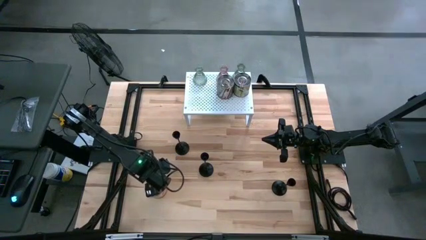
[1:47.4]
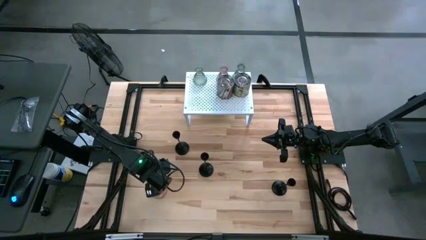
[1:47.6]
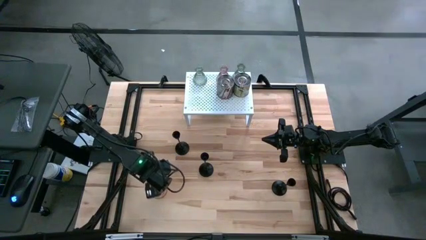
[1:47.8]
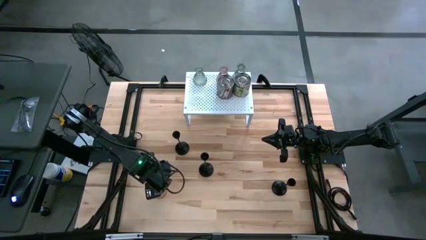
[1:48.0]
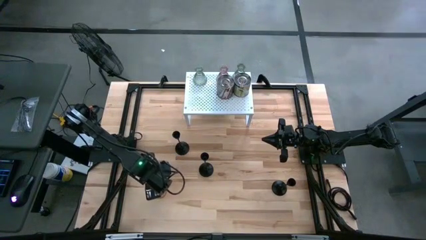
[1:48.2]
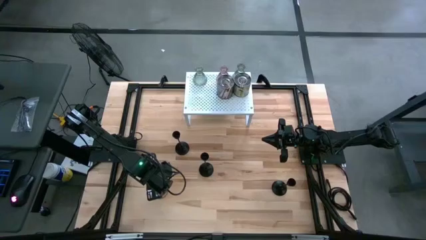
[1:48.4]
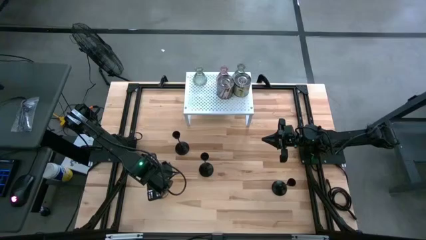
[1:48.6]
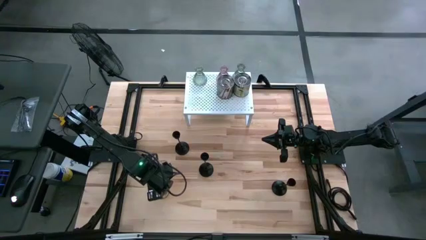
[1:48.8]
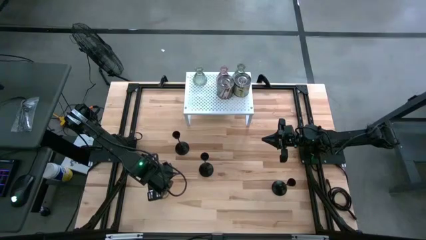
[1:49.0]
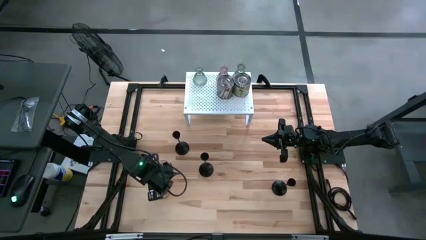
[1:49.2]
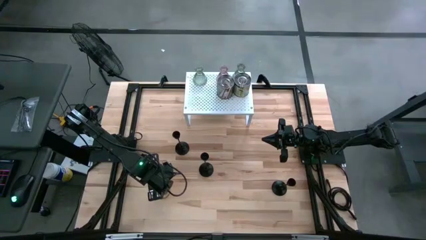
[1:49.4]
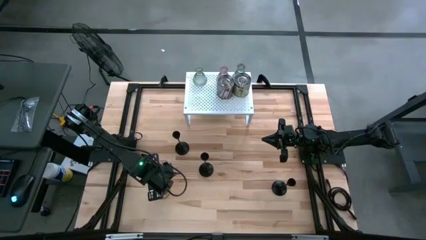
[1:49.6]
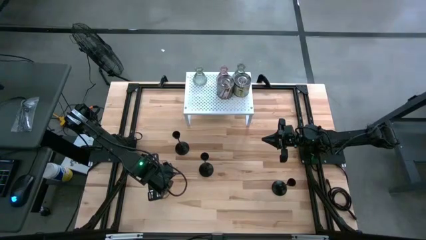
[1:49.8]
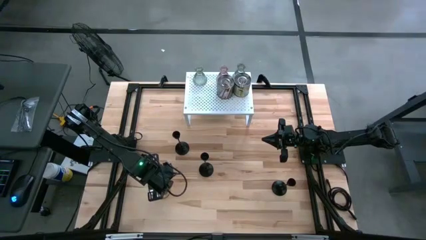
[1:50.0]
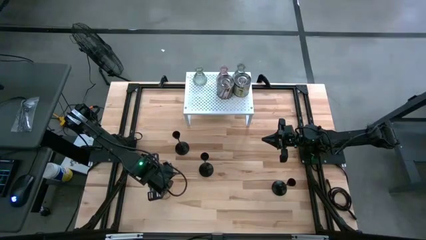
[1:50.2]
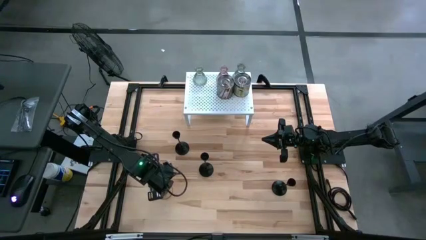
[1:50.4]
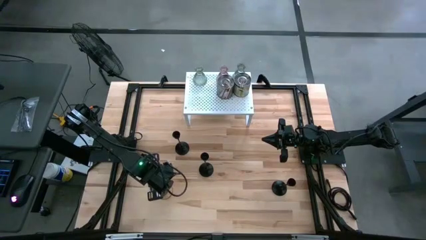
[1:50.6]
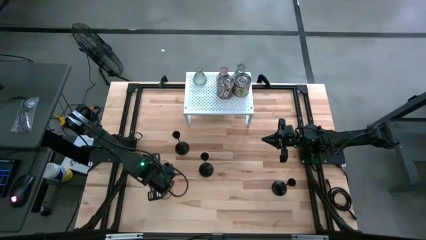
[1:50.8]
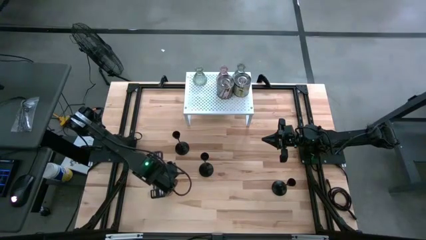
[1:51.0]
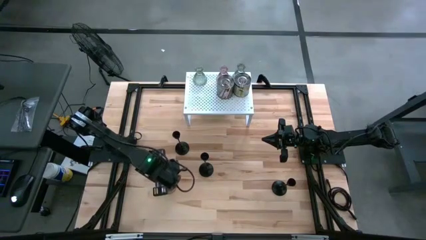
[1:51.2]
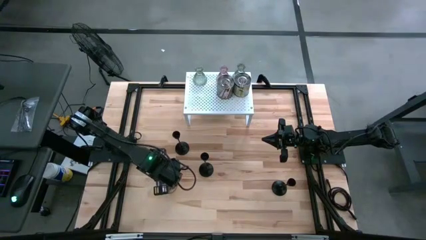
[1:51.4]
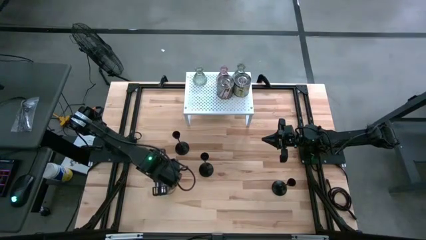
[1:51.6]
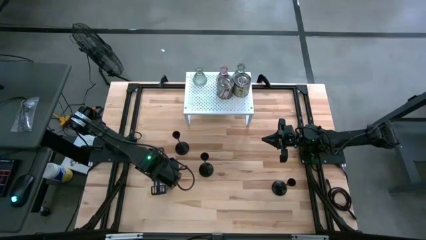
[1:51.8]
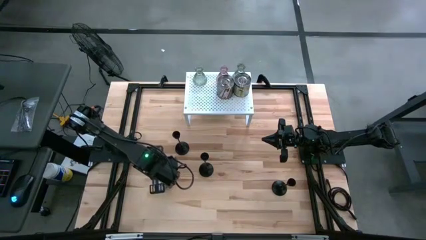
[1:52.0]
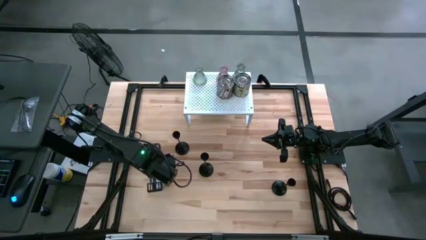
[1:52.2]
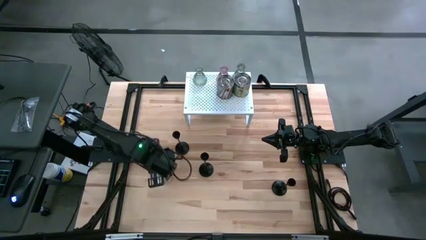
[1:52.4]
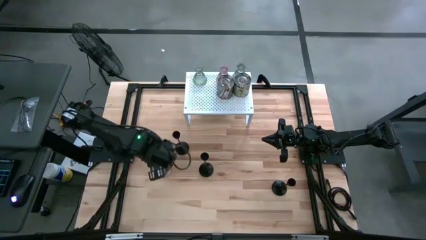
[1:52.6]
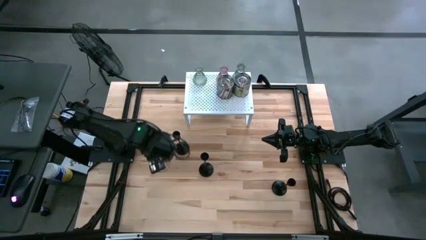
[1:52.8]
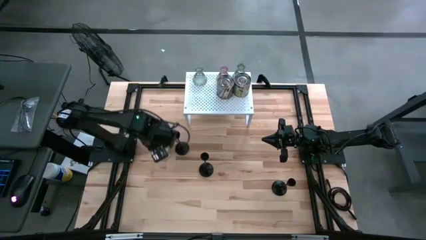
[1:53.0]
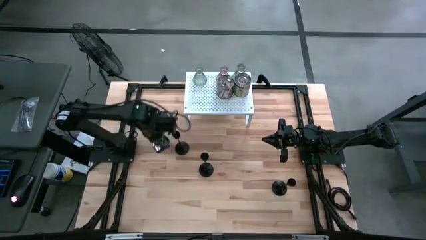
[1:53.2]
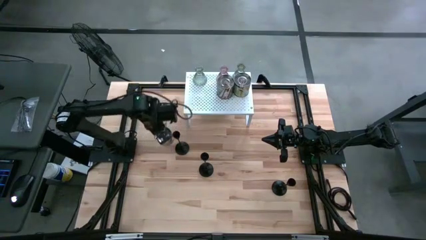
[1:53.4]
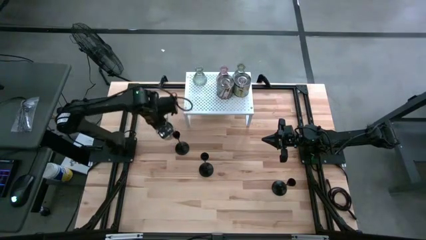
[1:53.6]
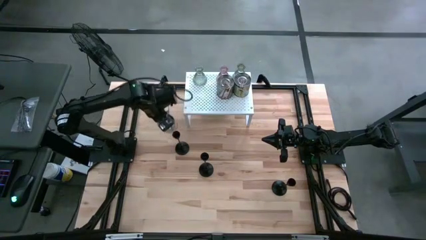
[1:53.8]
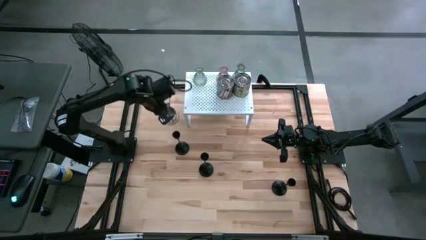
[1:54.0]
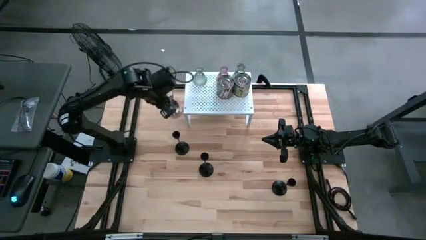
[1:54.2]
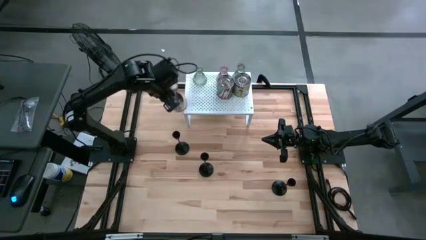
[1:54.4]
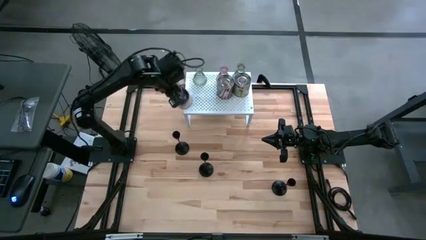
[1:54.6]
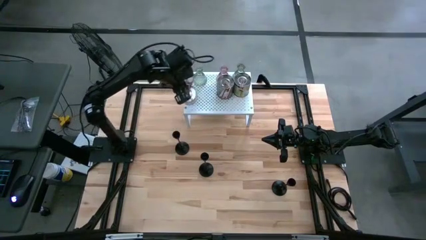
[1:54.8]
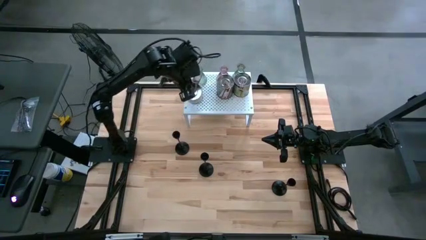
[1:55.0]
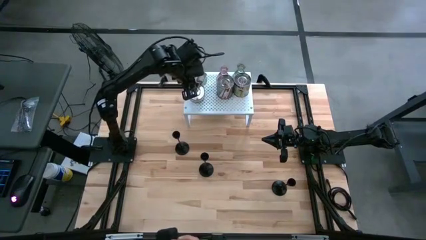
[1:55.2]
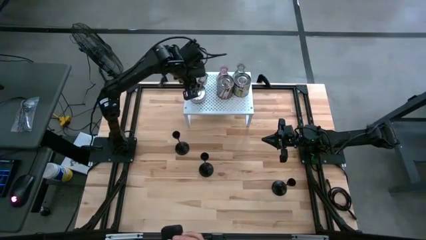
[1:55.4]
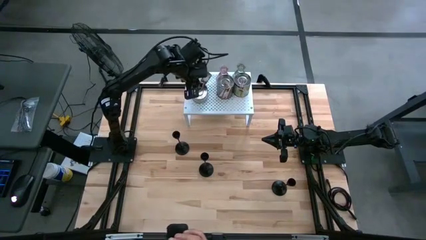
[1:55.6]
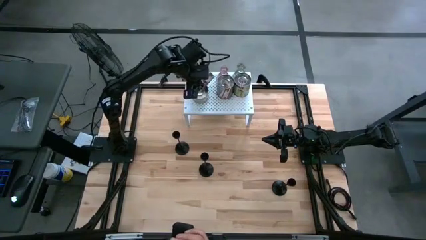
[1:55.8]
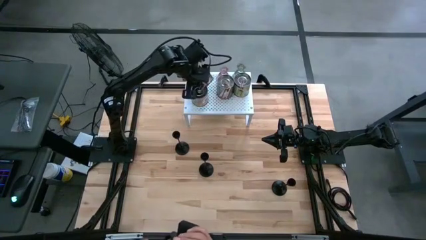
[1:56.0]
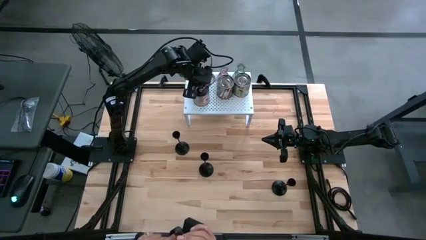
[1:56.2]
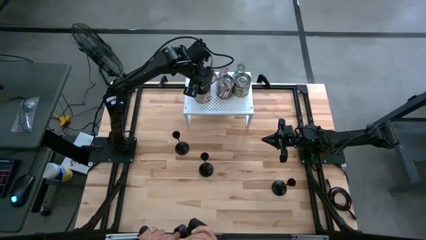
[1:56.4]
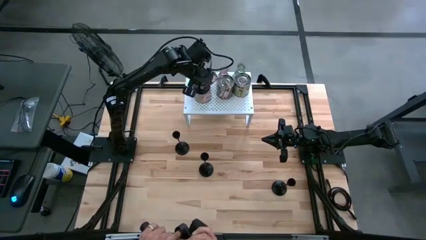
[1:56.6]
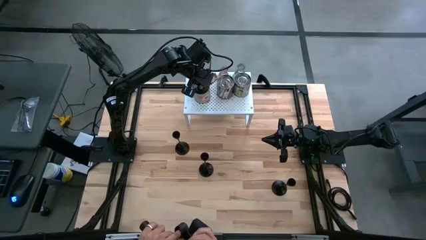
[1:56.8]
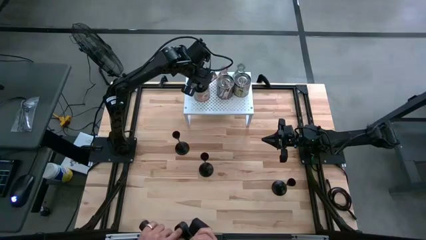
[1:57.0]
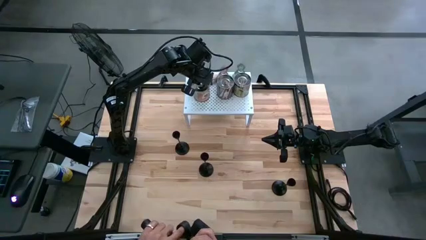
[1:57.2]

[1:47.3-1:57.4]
Task: Pick & Place candle stick holders
Put the orange scented candle on the shelf aligned with the other scented candles

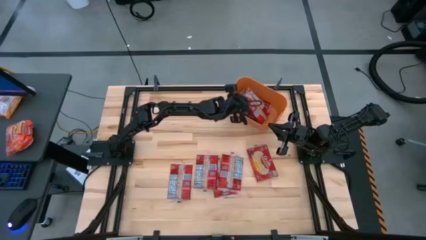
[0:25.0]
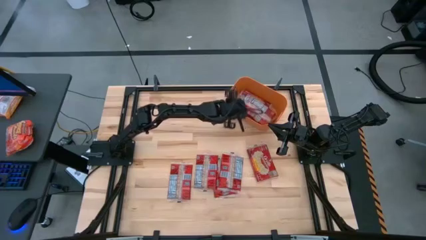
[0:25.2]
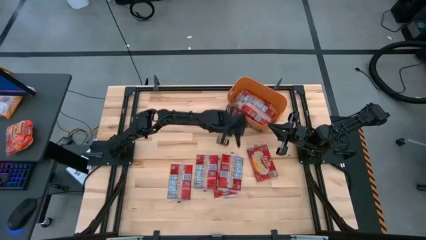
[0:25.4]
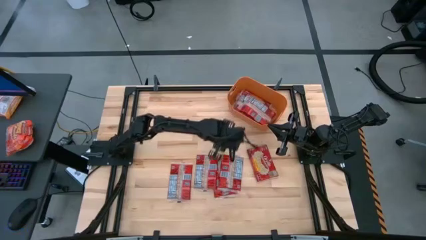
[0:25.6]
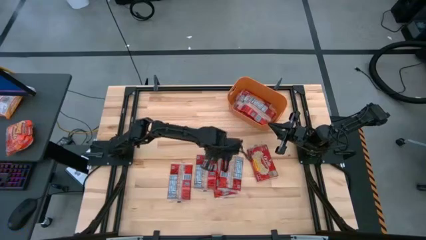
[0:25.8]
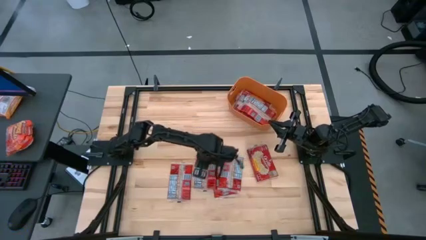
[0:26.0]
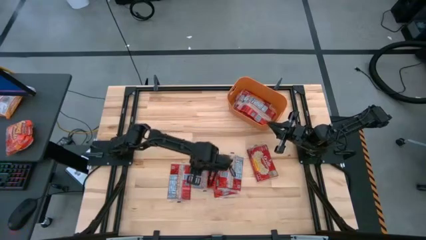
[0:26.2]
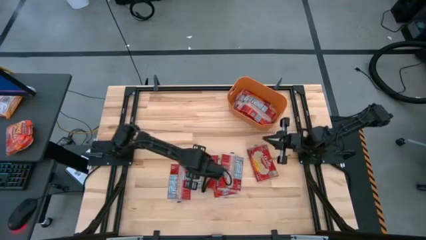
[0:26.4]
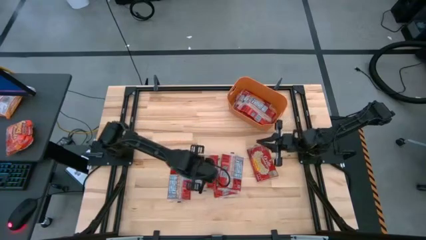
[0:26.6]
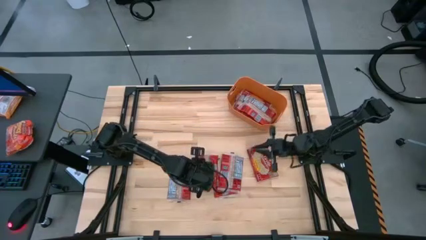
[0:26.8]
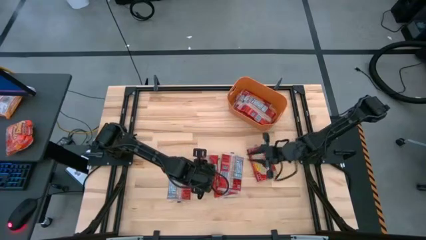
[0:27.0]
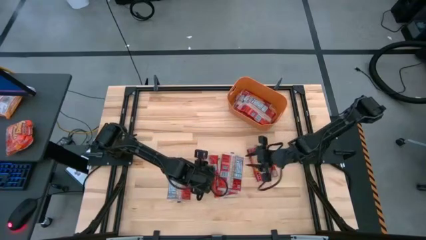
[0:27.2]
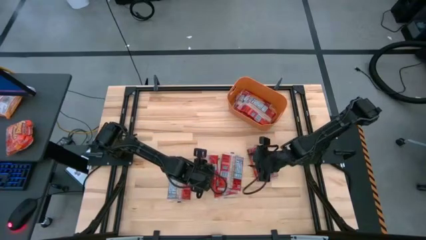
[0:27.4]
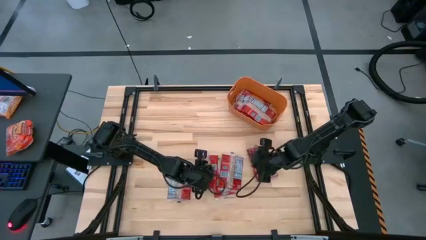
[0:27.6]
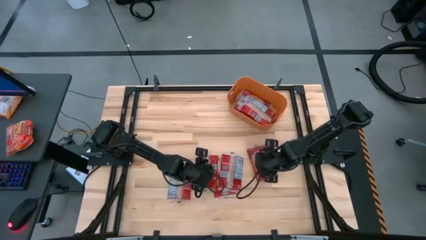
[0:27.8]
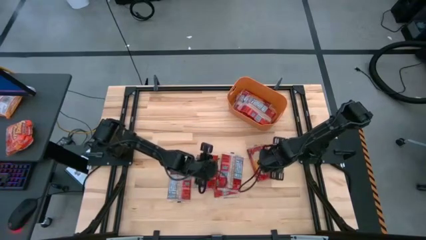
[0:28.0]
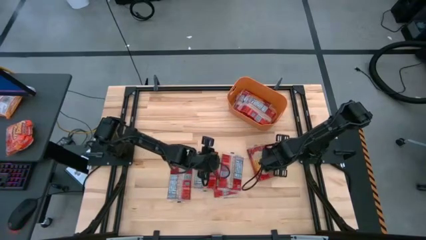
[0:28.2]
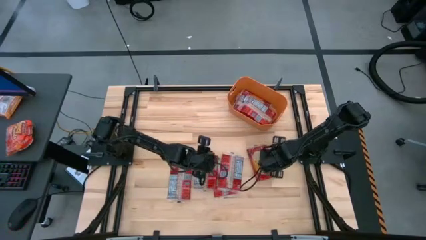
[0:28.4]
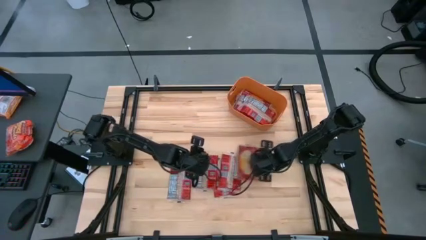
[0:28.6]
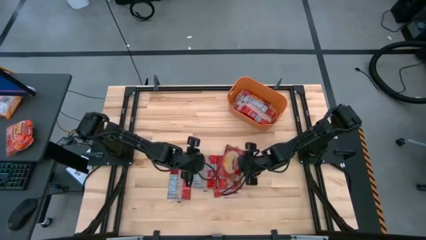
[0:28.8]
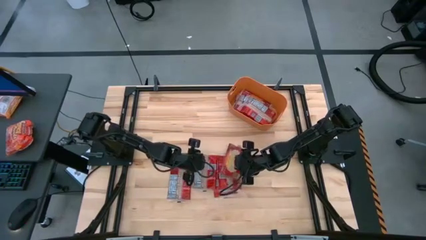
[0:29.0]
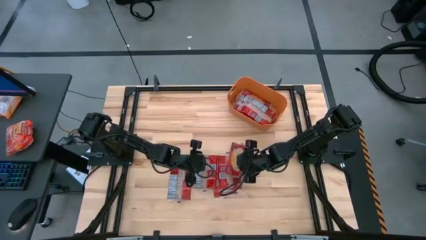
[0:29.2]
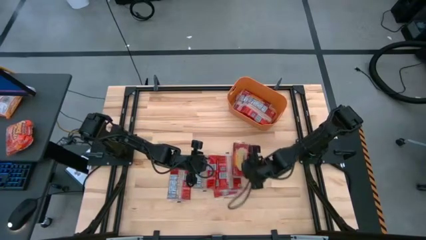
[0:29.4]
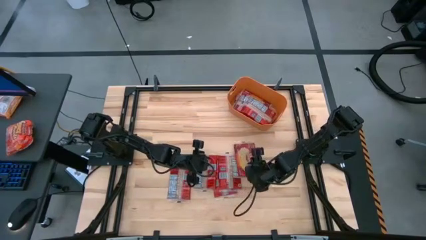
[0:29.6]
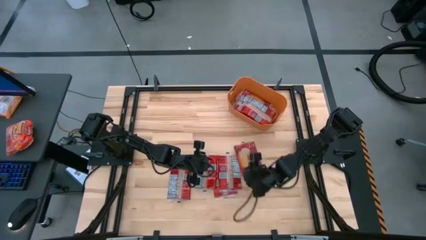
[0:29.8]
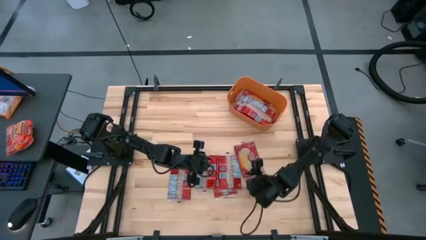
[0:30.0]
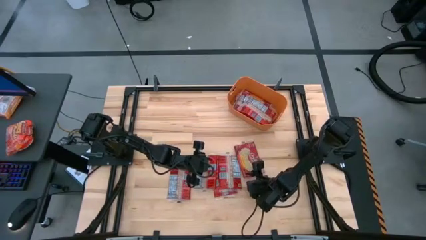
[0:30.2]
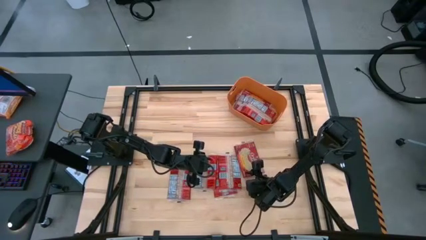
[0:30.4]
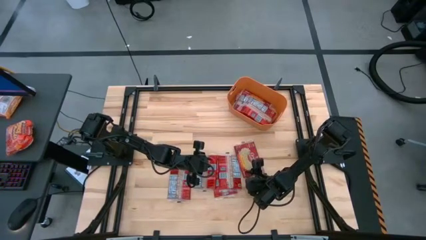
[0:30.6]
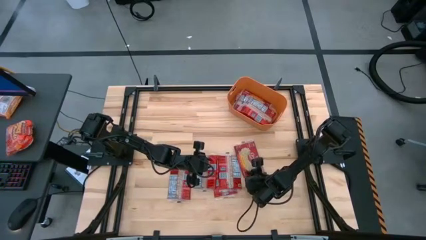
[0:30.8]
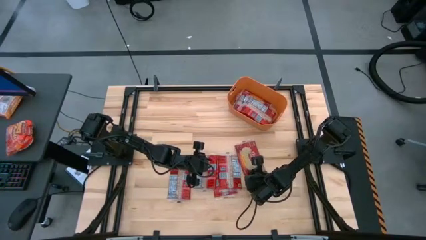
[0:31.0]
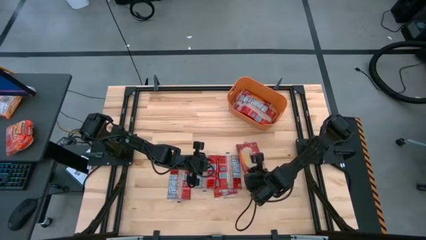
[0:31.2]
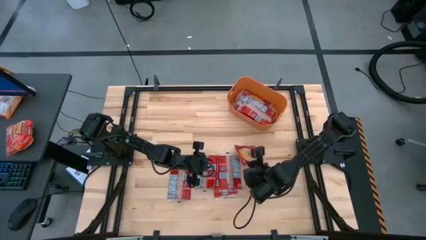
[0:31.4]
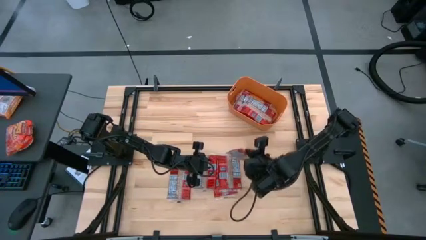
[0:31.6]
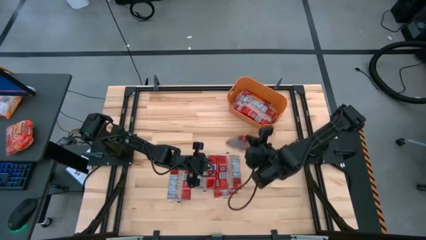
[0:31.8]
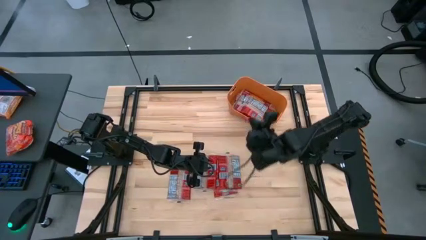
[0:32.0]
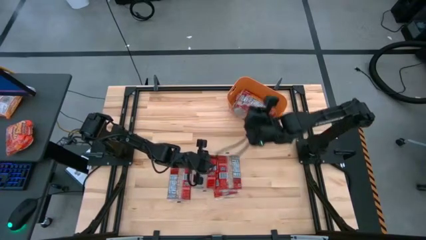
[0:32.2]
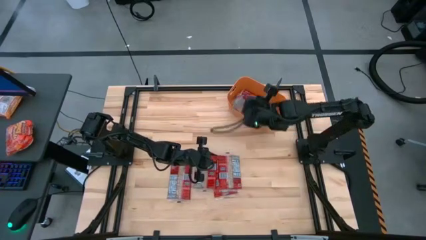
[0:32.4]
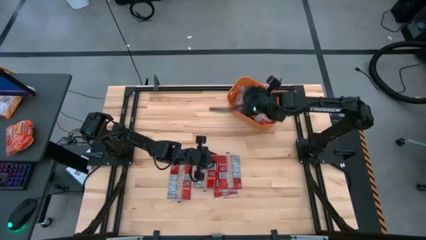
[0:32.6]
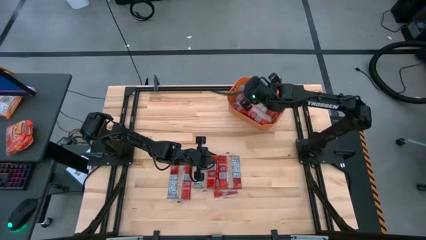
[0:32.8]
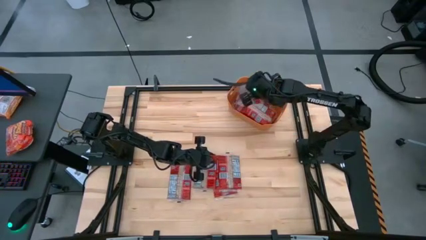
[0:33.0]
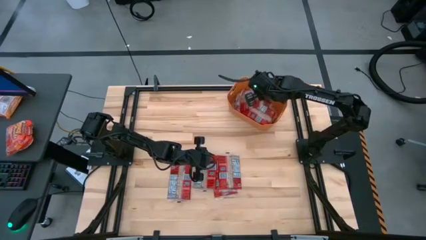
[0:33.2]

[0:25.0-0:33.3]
Task: Sort popcorn bags into baskets
Put the red popcorn bag into the orange bin
